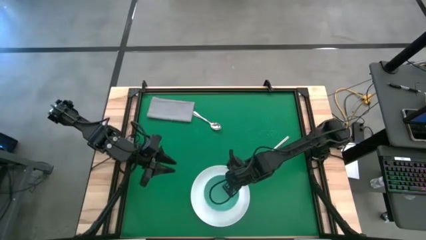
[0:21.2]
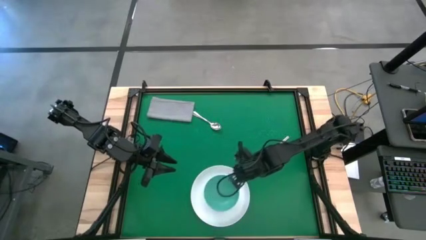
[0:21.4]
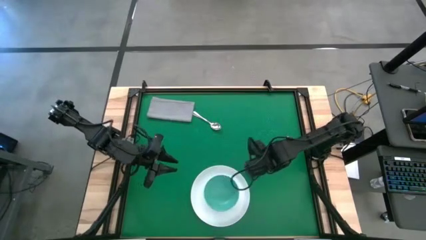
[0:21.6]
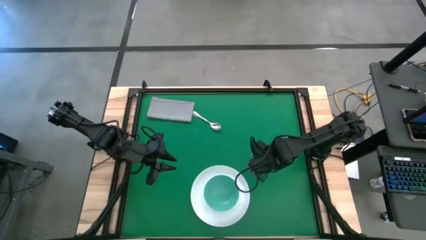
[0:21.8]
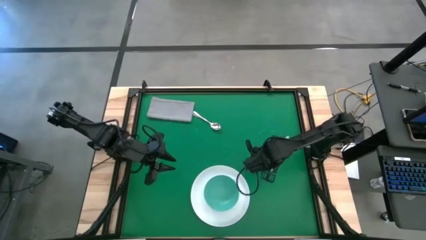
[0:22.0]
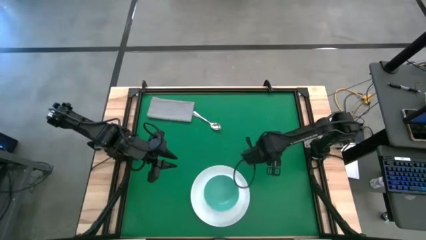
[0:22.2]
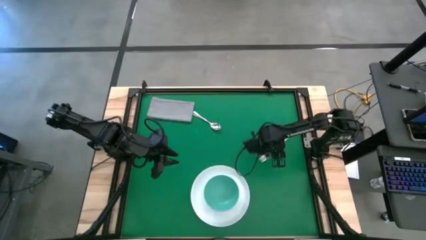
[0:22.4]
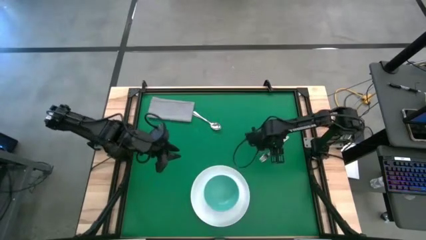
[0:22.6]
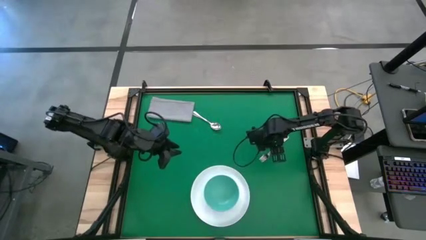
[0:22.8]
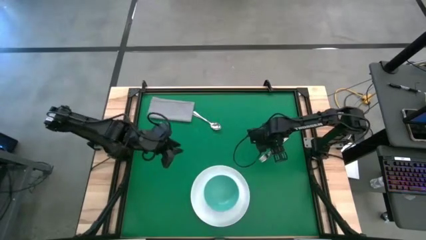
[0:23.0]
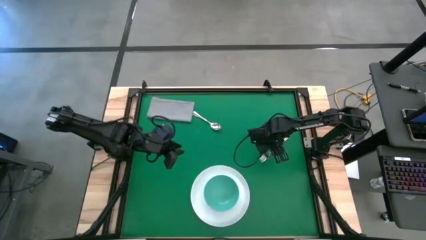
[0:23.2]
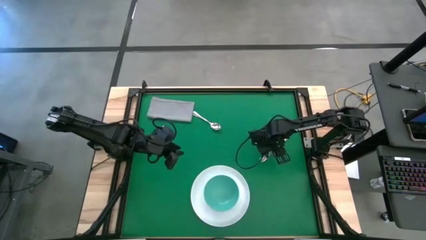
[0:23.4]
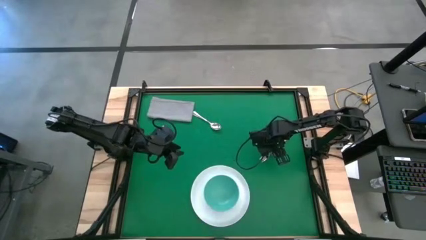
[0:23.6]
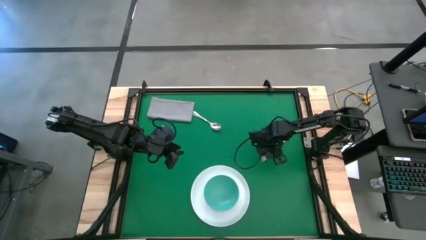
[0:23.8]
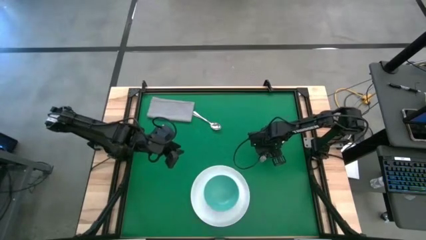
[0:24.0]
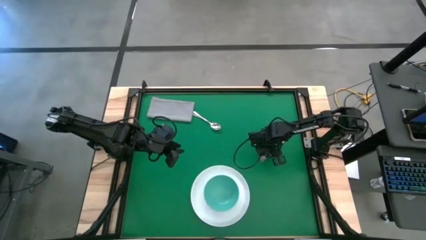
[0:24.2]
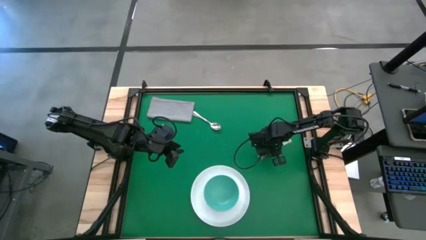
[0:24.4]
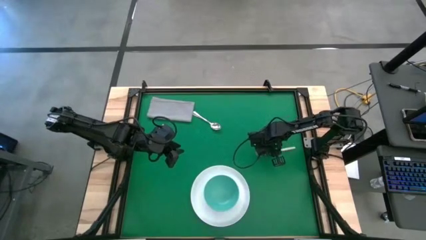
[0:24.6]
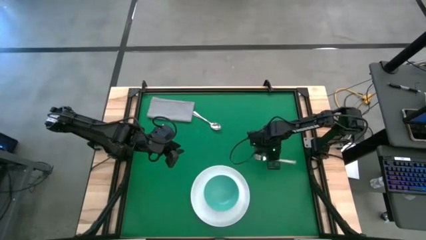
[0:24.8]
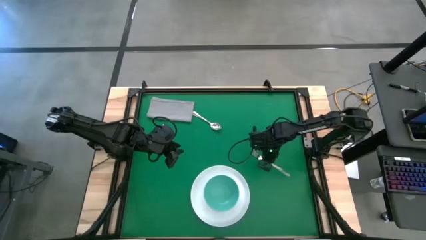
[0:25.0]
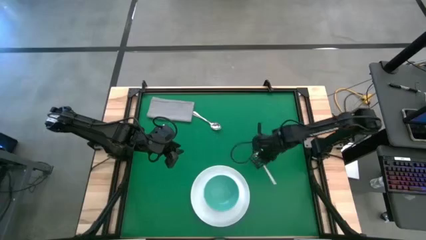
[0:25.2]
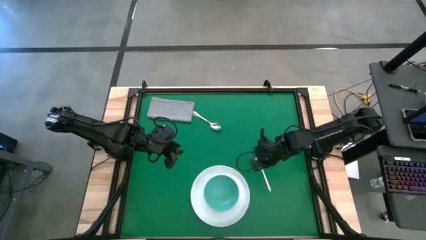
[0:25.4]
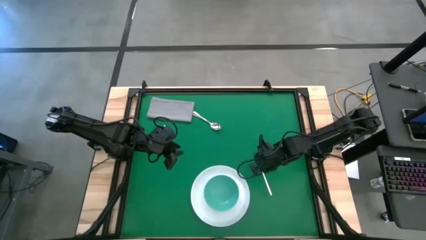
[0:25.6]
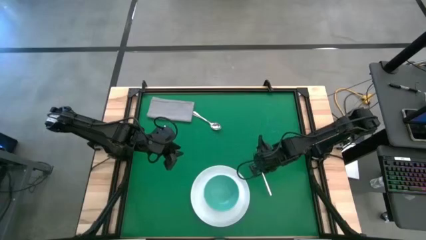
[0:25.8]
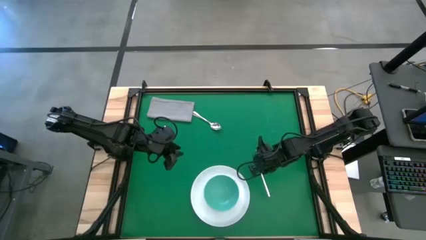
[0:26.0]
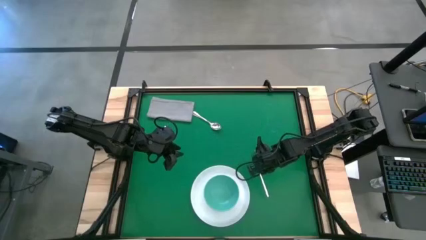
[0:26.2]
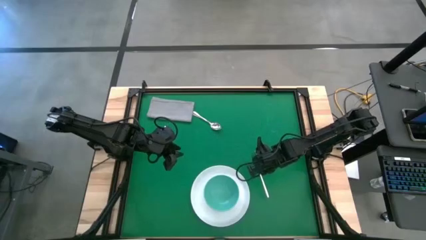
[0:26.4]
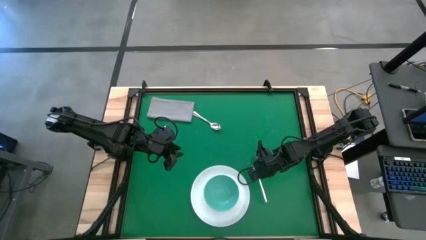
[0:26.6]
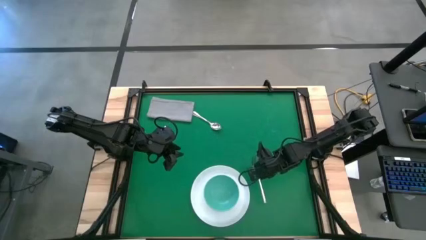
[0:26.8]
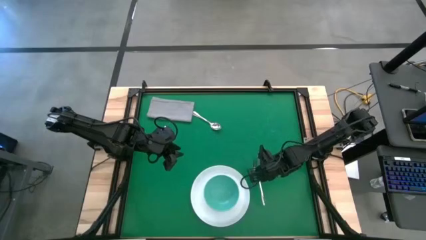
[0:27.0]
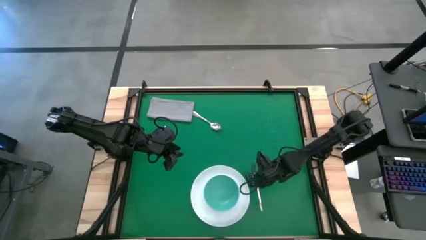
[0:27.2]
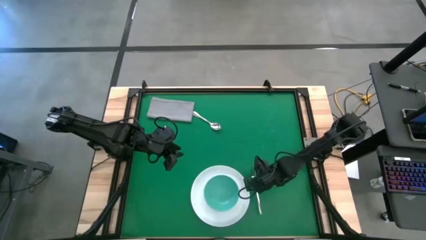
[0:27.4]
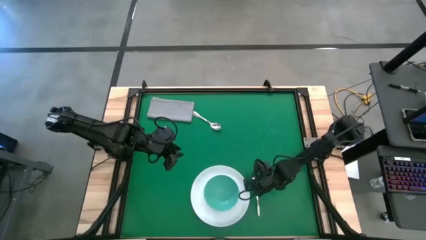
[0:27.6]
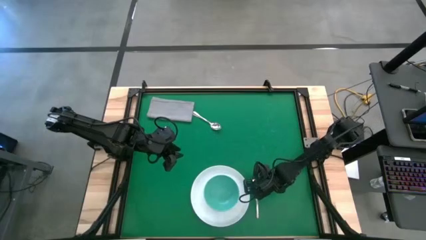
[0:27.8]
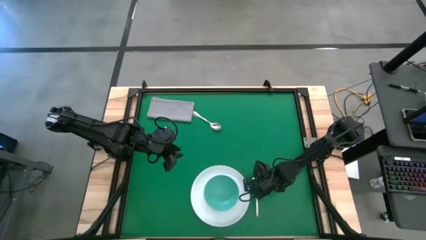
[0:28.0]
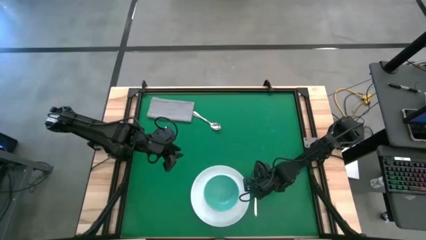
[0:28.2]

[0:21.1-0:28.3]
Task: Pick and place plate/cup/fork/spoon on tray
Move the silver fork to the right side of the white plate

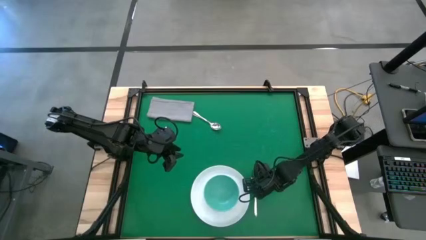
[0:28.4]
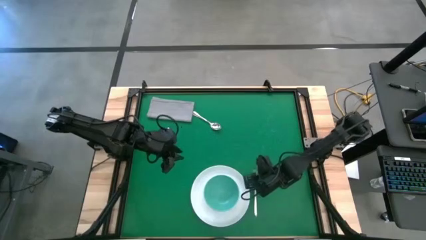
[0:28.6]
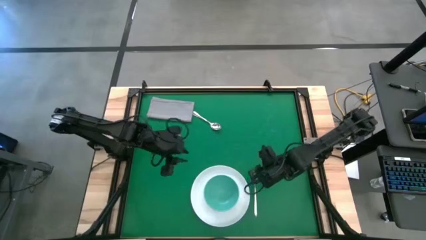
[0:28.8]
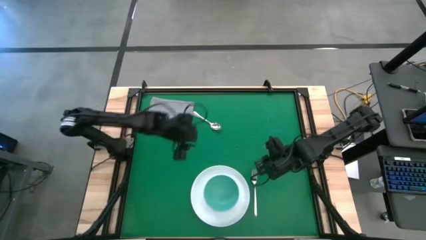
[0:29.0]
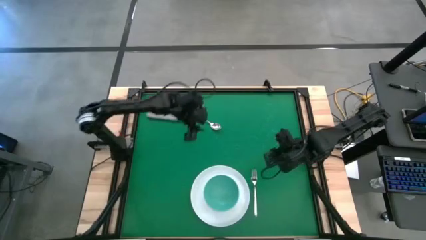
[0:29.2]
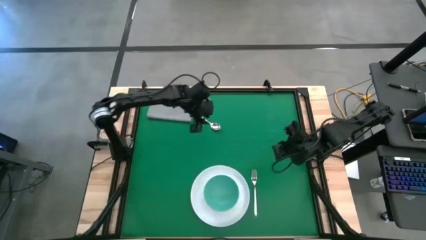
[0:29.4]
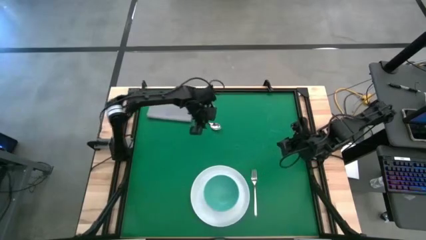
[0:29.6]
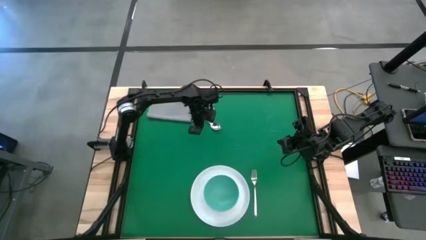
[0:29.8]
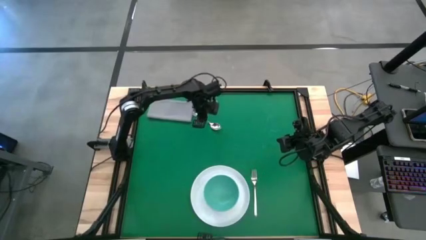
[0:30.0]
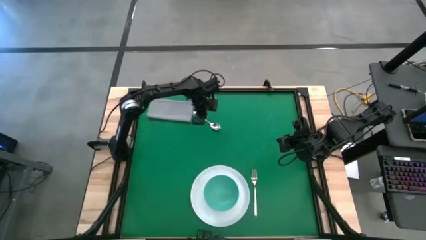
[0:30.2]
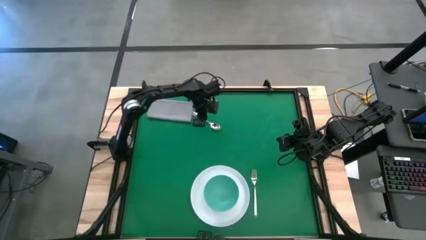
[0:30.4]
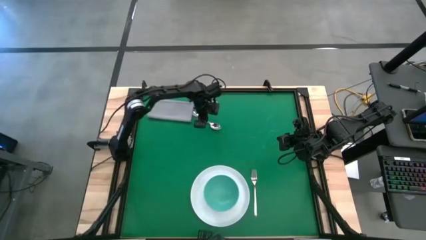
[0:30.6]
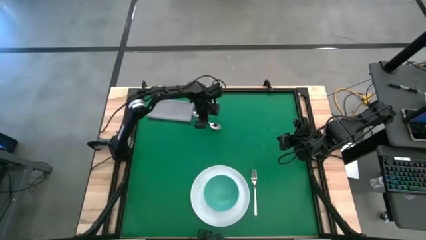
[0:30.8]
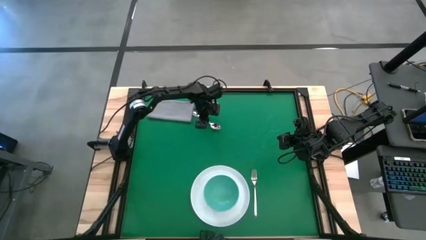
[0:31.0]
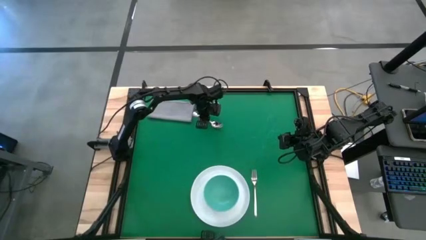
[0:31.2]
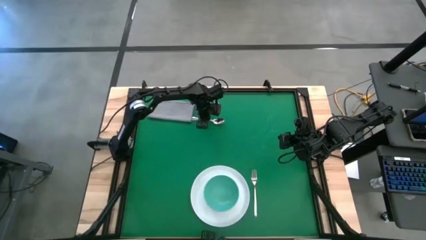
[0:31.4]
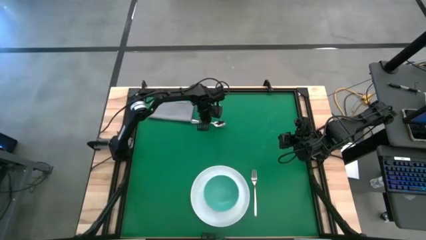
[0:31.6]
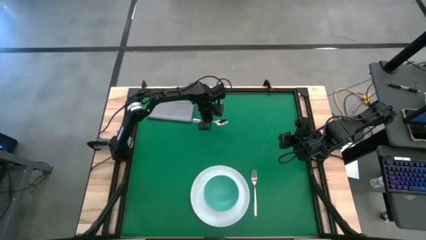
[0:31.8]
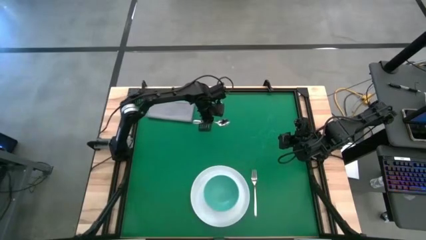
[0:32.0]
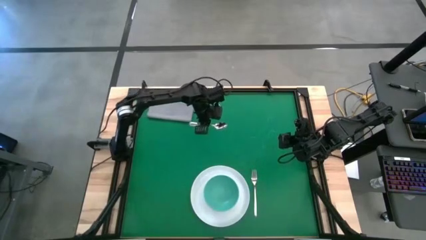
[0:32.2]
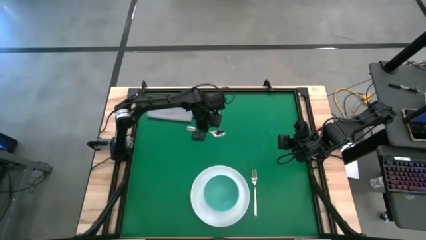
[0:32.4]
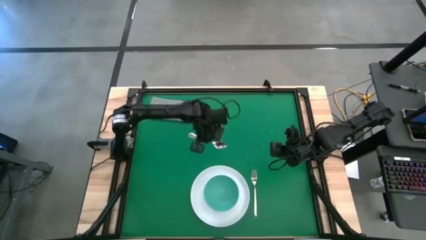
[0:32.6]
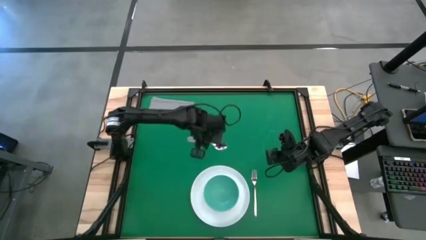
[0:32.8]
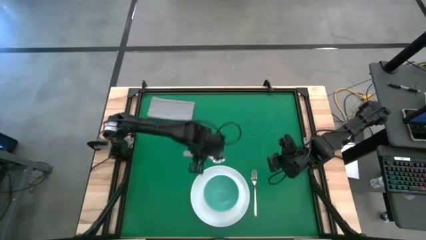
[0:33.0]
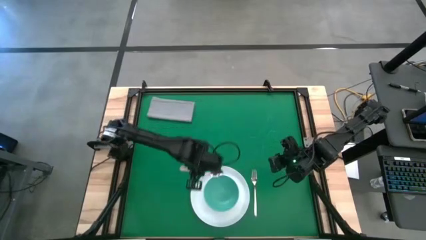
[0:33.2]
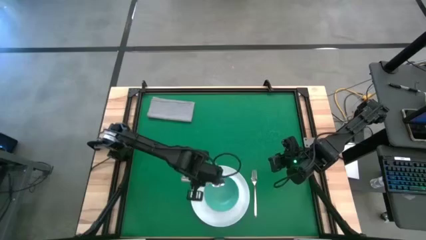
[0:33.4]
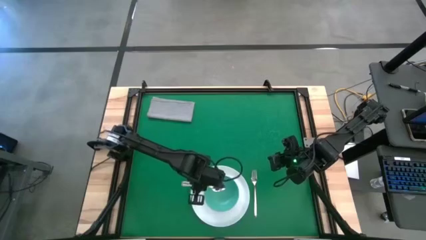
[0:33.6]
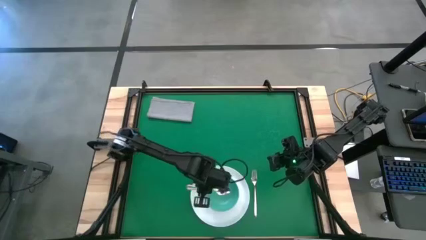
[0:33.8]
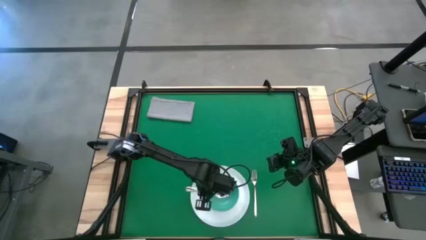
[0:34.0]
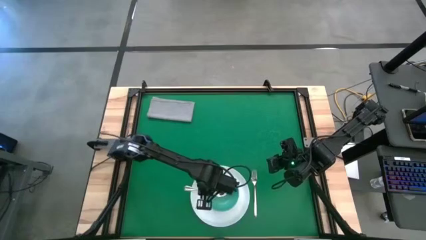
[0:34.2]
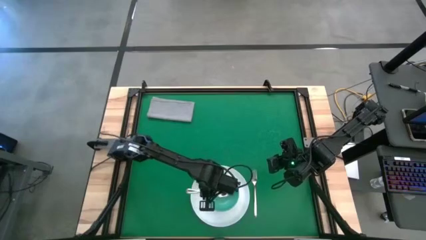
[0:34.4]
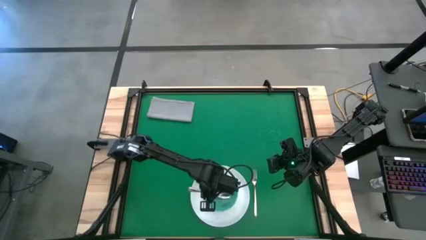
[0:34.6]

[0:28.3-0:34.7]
Put the silver spoon into the green bowl

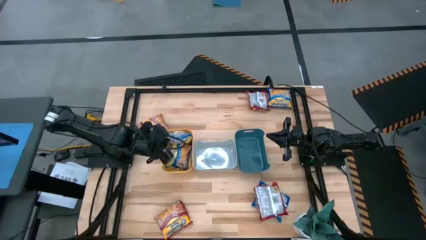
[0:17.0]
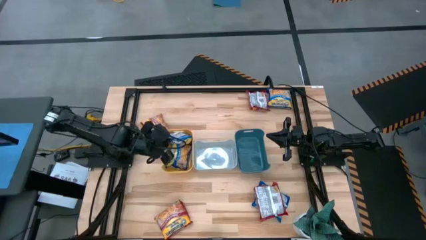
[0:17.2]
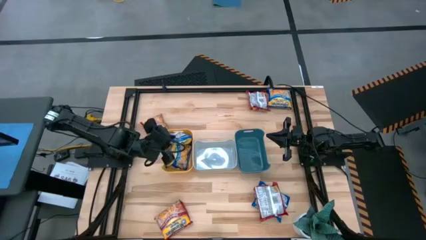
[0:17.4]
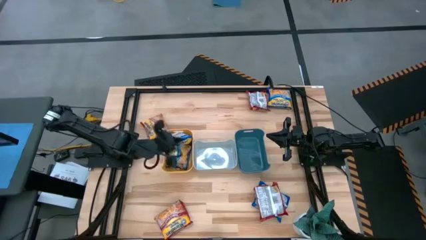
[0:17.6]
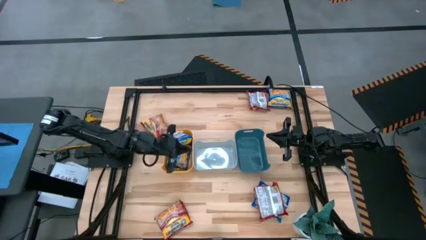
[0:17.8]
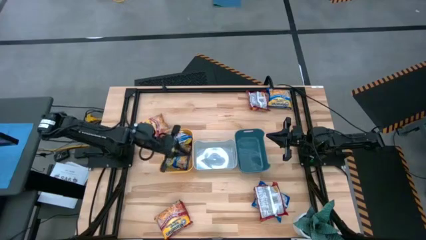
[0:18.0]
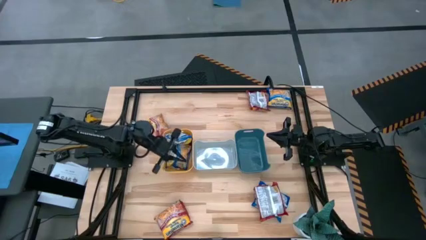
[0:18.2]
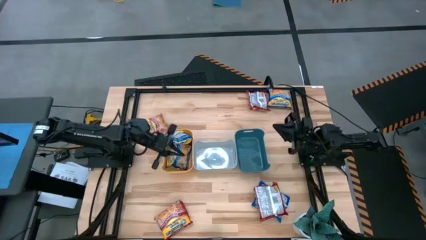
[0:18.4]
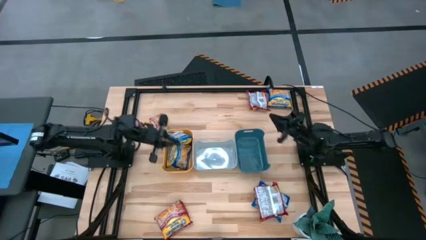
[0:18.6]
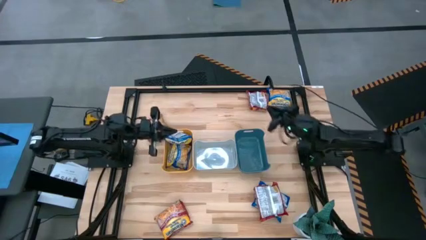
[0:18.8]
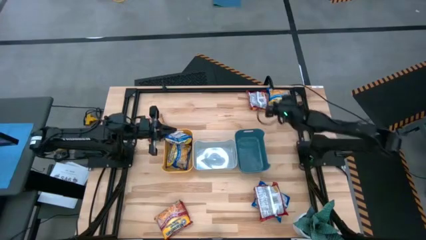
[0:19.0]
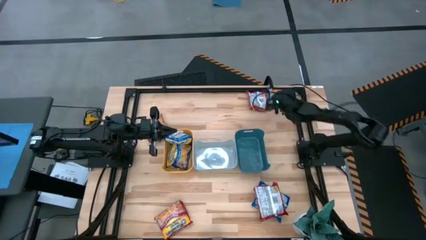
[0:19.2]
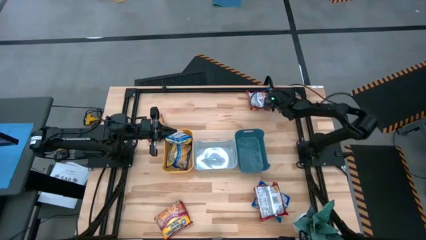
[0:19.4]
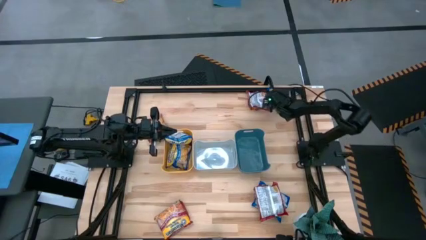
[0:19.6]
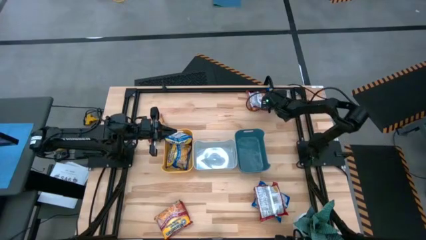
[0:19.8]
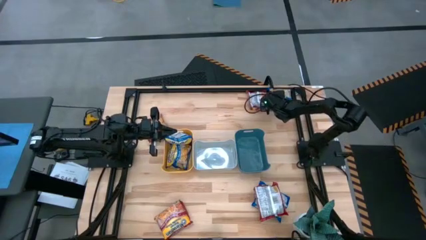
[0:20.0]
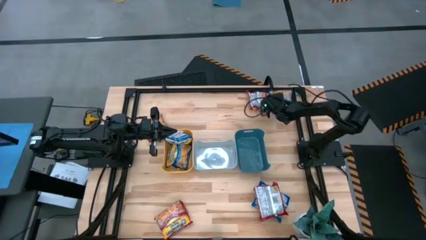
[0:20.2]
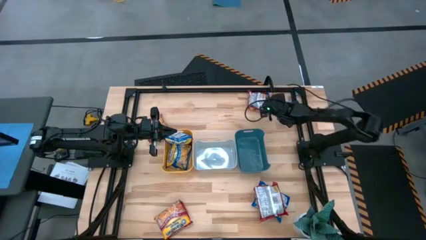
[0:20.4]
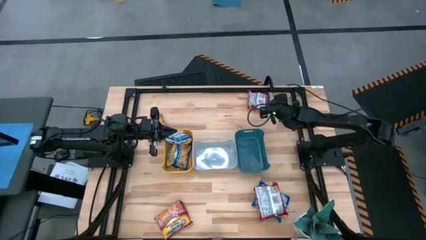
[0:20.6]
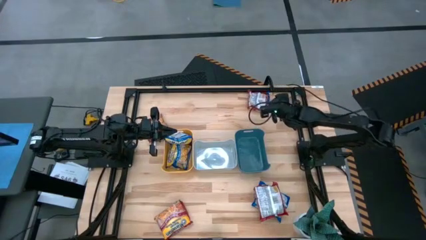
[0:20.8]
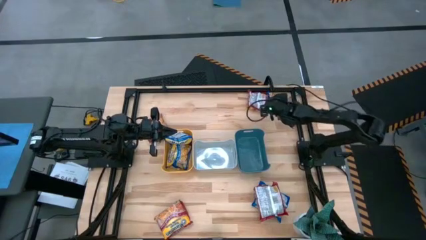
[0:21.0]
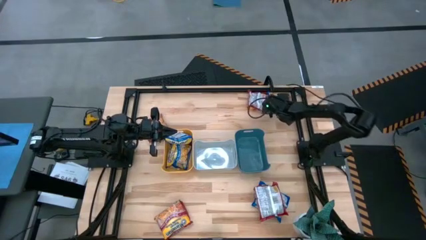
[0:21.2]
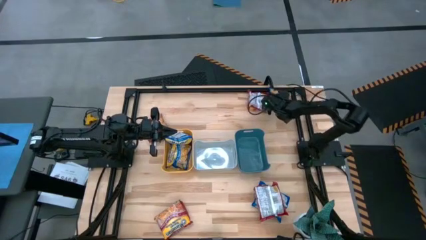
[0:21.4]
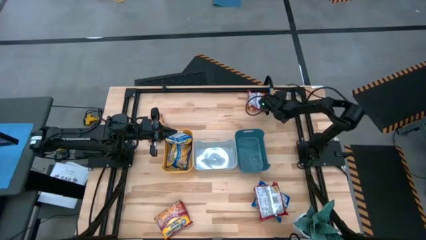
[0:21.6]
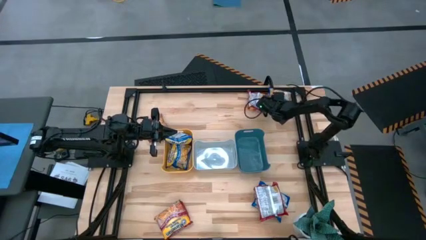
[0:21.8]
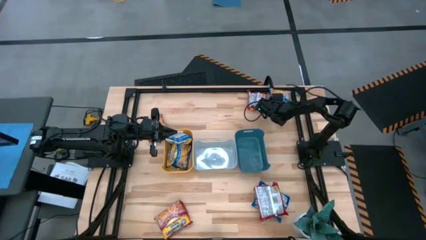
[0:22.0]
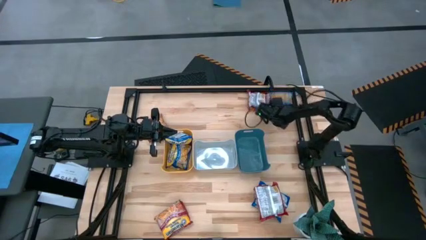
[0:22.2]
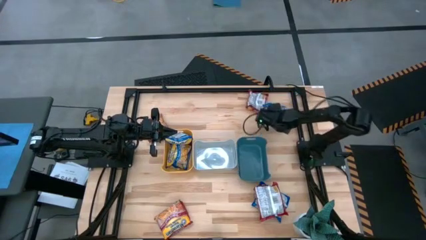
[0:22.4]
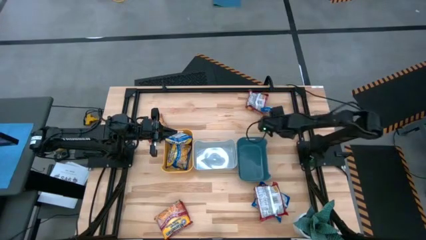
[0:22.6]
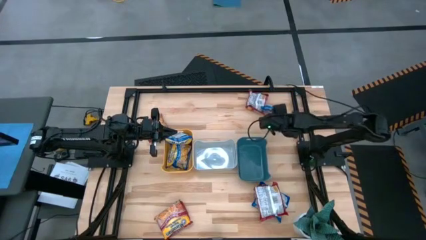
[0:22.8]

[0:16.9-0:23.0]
Task: Sort Maruchan noodles
Put the top blue noodle pack into the yellow bin
